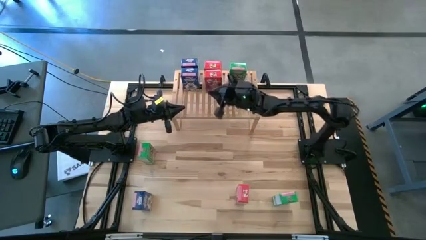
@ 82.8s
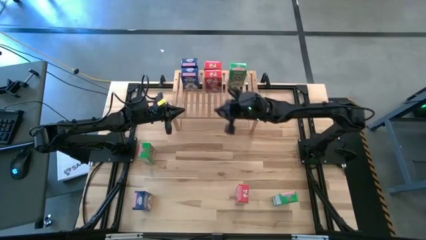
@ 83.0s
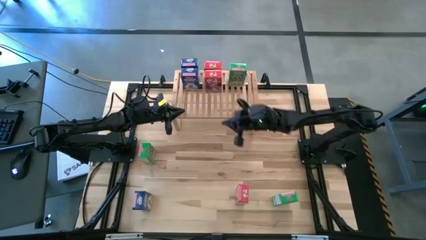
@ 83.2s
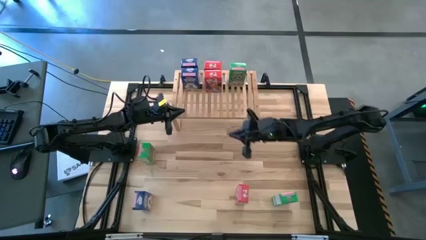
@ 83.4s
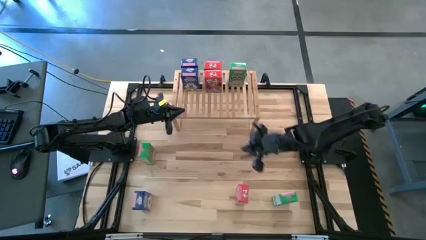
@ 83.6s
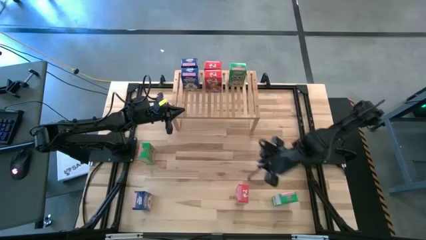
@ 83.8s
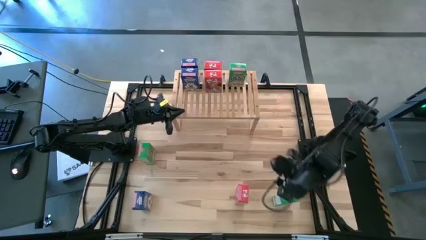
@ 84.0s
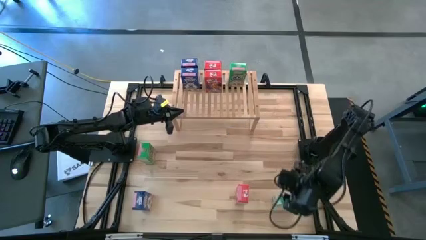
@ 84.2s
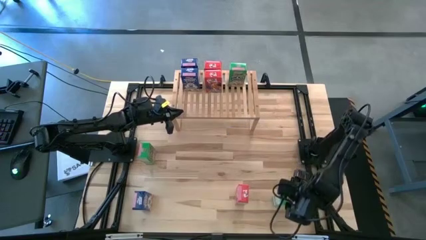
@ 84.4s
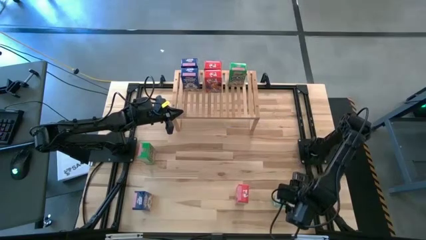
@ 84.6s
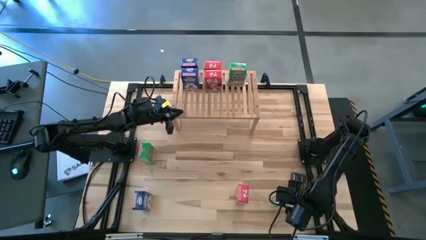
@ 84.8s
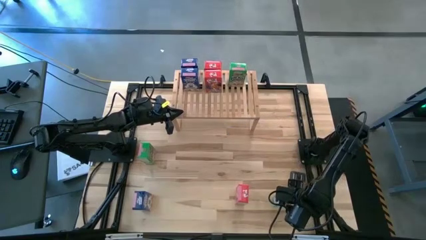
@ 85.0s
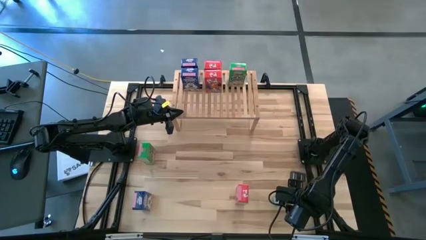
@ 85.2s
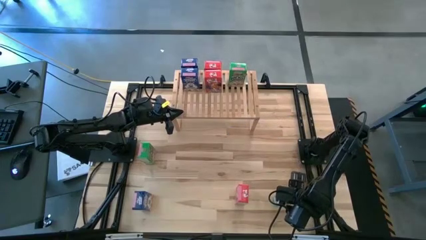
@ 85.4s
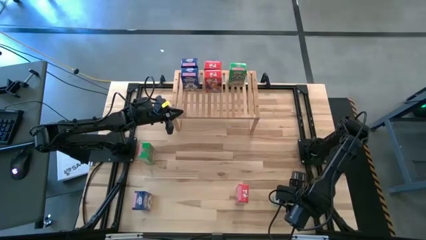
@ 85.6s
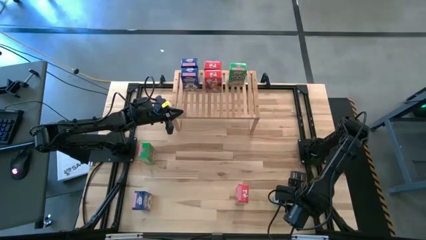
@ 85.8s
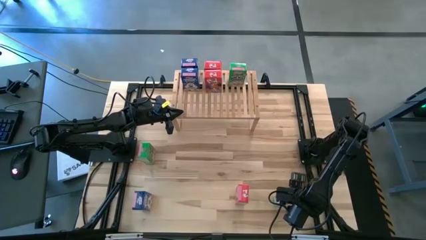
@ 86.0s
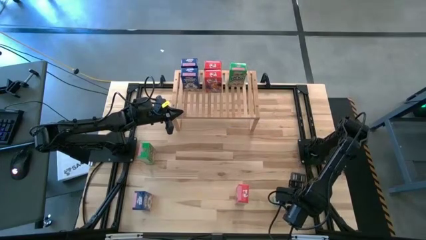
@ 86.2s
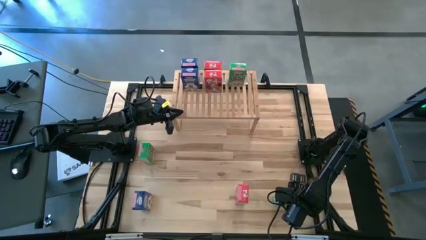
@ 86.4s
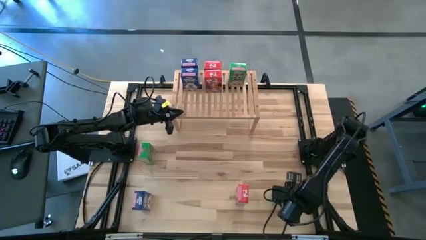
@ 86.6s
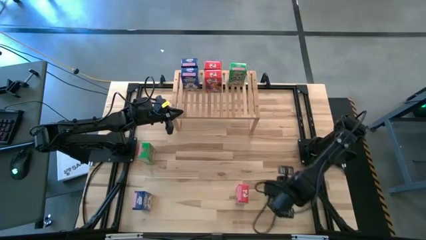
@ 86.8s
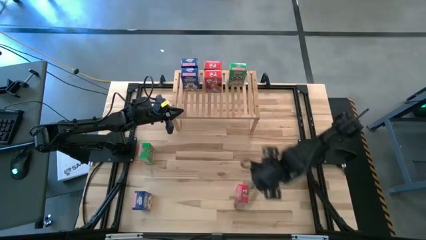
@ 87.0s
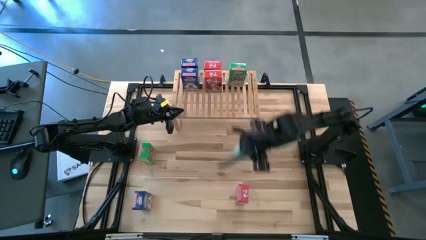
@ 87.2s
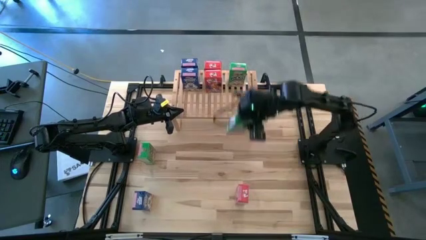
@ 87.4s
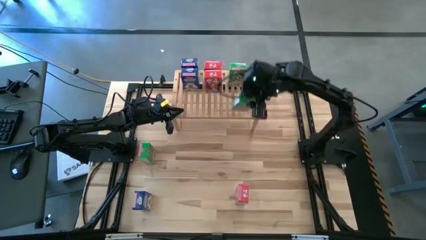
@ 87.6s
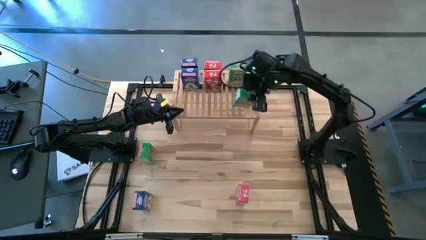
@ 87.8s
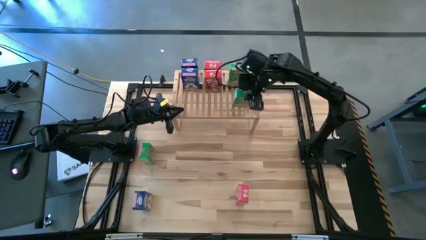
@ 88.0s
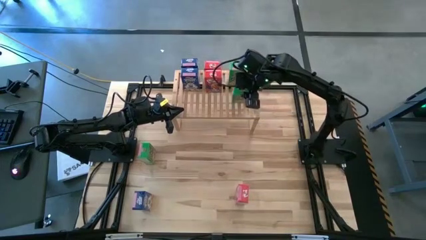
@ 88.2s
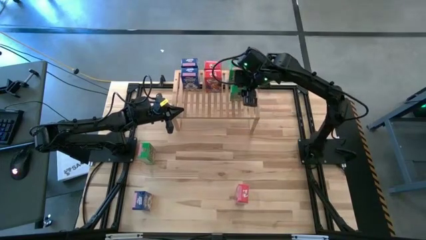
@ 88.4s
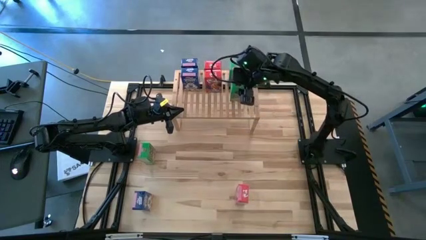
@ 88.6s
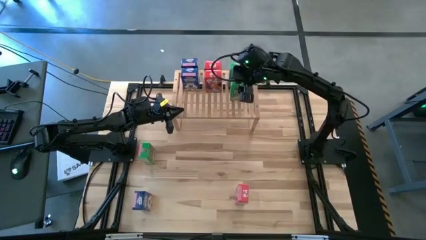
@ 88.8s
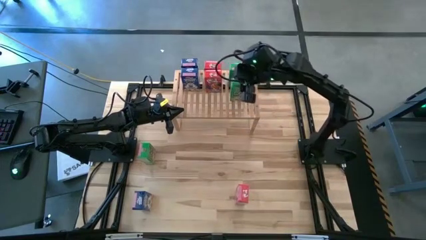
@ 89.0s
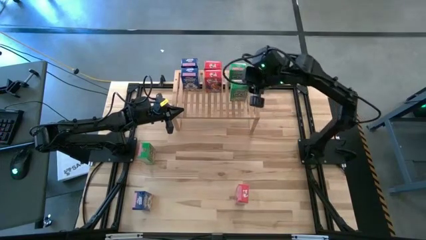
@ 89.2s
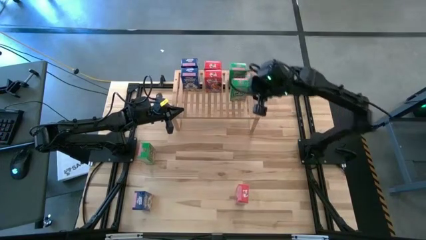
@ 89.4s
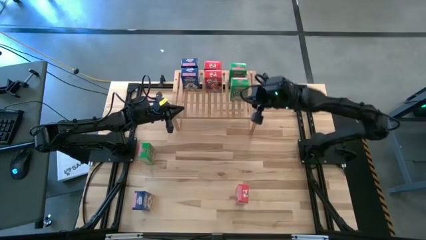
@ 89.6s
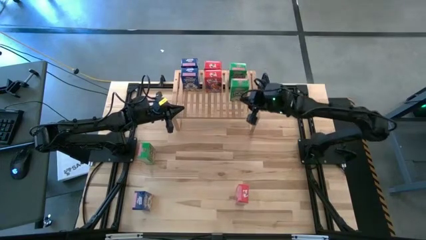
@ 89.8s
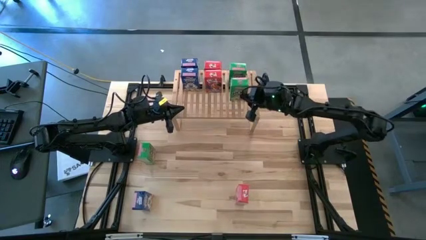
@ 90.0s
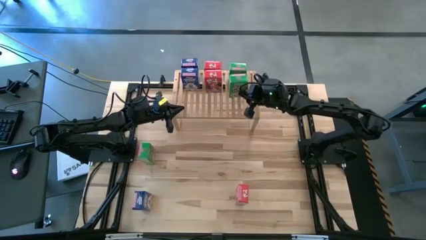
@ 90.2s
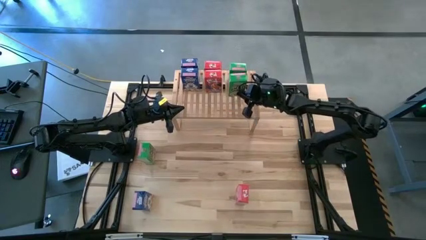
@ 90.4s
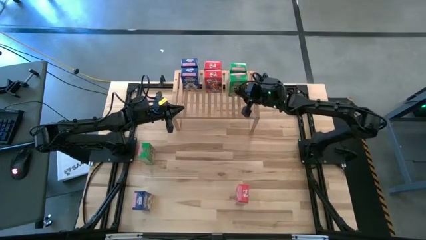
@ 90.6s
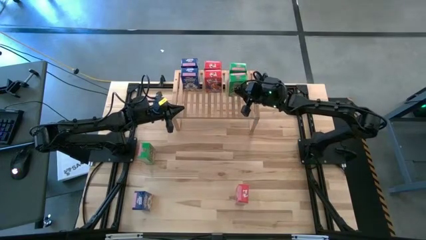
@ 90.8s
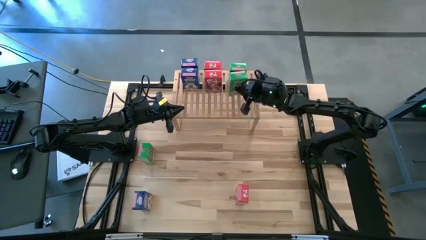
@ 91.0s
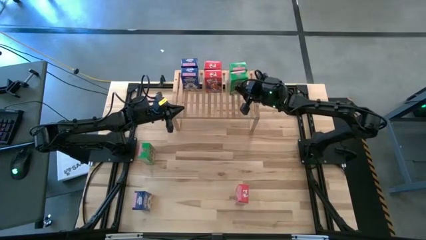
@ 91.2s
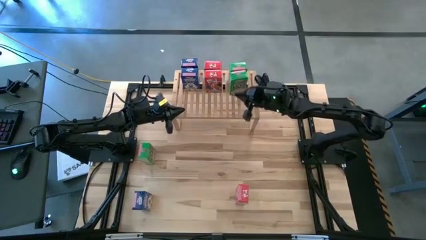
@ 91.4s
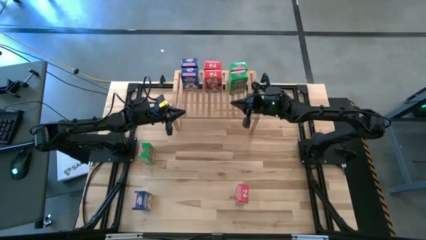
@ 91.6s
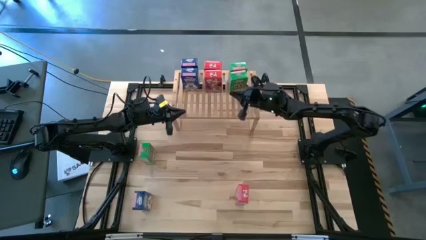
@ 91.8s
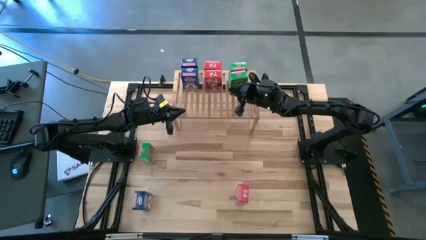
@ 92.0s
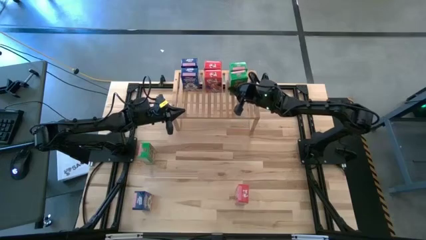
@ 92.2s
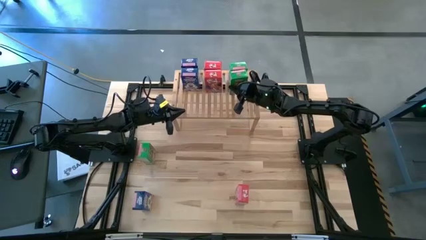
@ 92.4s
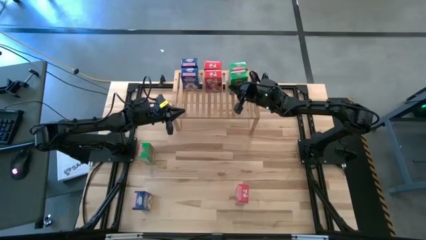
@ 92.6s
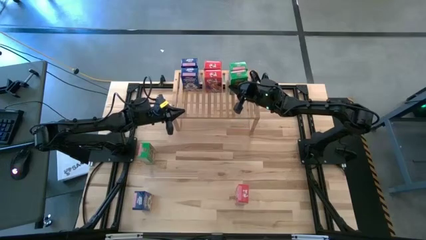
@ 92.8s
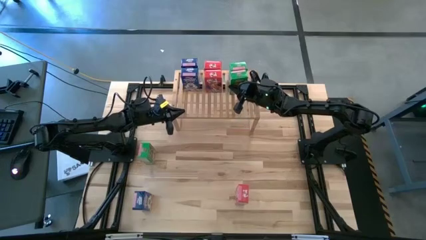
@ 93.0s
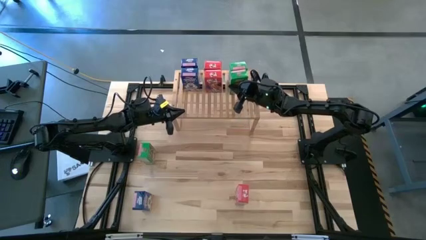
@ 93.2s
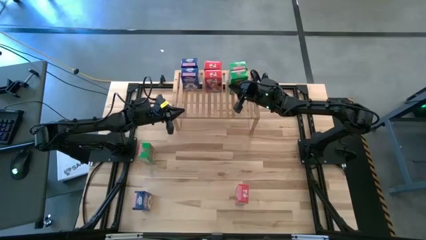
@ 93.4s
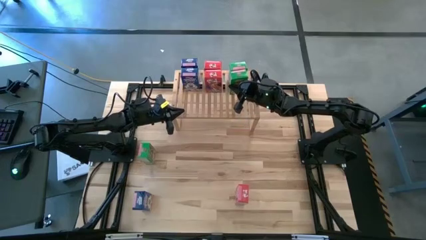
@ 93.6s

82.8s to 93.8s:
Task: Stack cereal on shelf
Put the bottom green cereal box on the shelf aligned with the other green cereal box

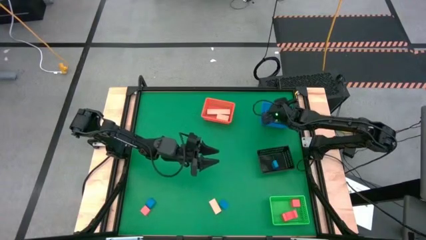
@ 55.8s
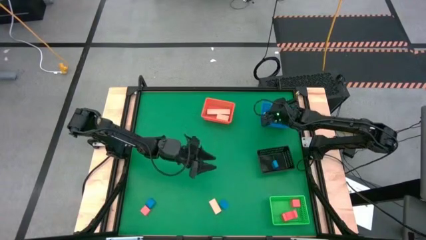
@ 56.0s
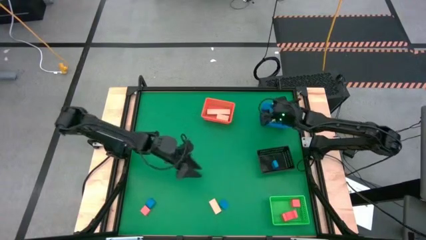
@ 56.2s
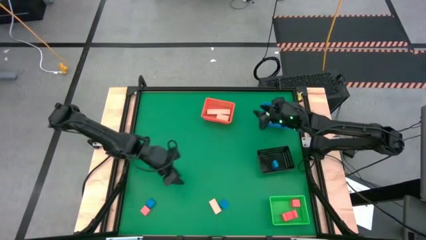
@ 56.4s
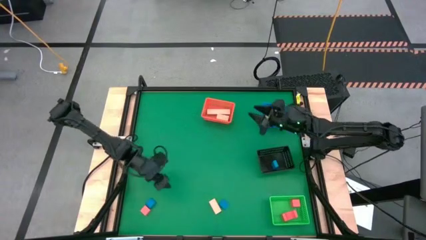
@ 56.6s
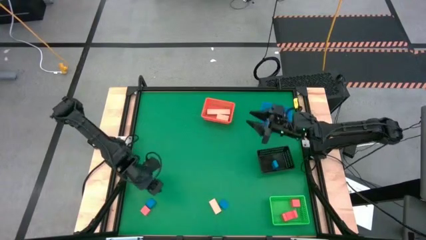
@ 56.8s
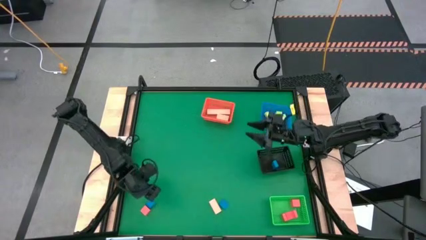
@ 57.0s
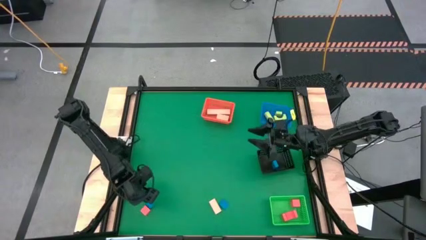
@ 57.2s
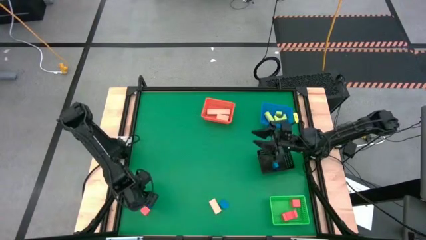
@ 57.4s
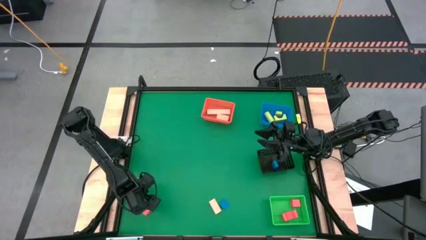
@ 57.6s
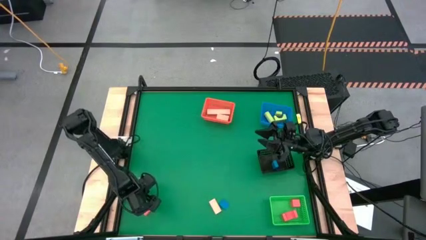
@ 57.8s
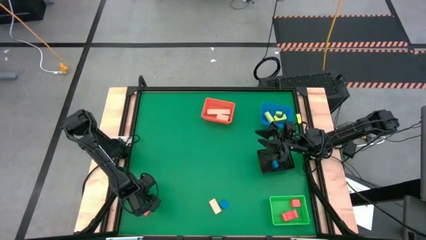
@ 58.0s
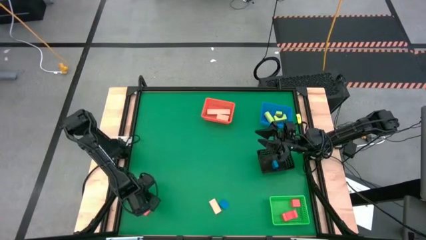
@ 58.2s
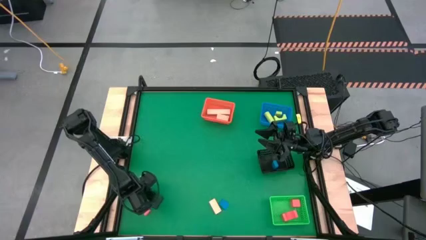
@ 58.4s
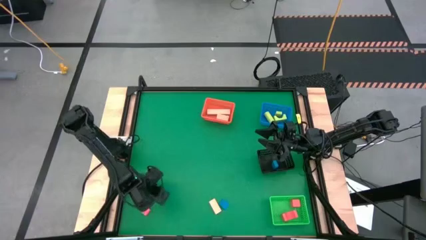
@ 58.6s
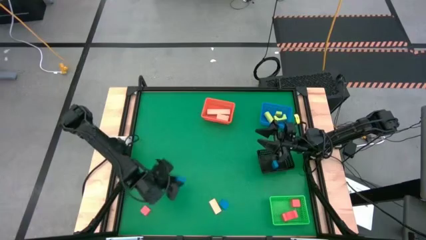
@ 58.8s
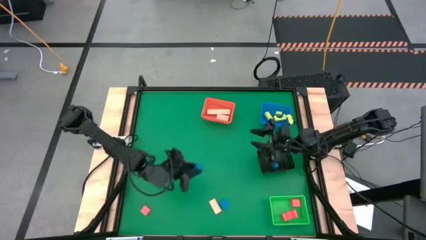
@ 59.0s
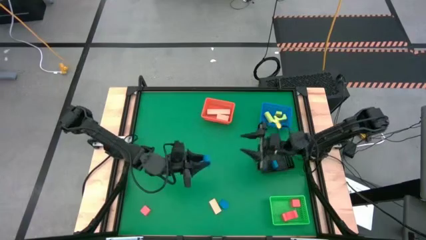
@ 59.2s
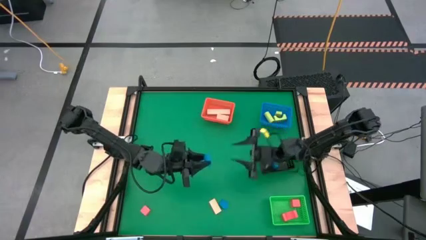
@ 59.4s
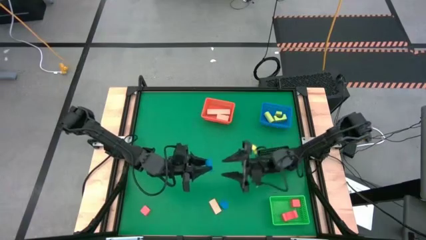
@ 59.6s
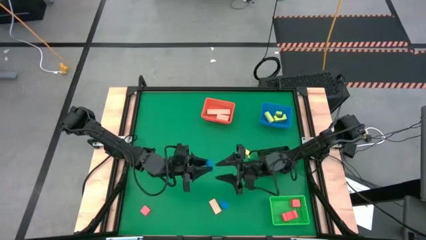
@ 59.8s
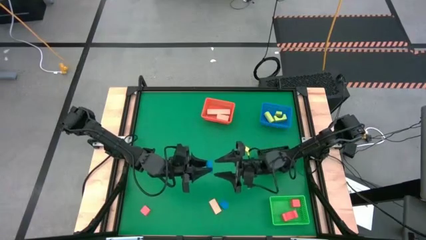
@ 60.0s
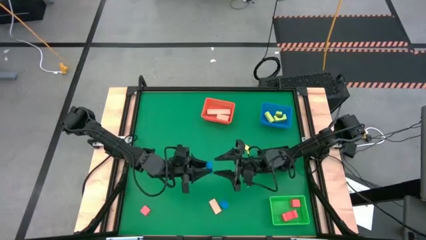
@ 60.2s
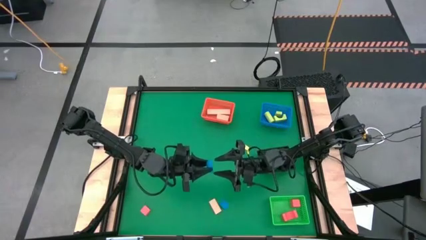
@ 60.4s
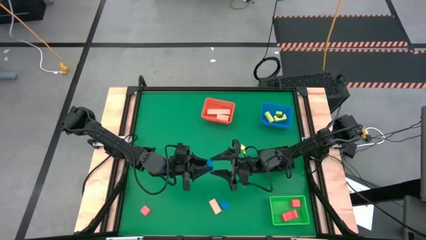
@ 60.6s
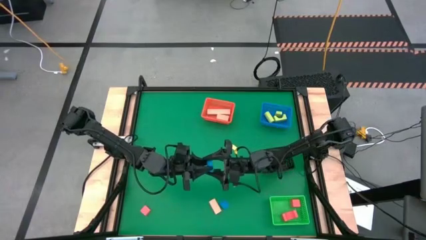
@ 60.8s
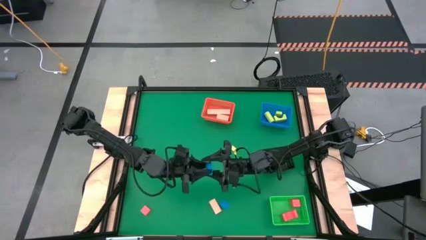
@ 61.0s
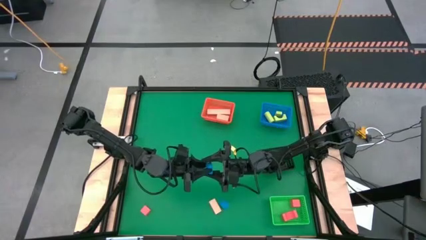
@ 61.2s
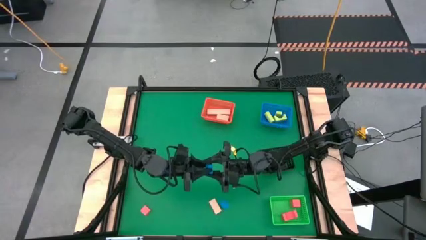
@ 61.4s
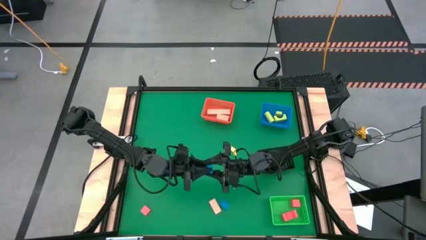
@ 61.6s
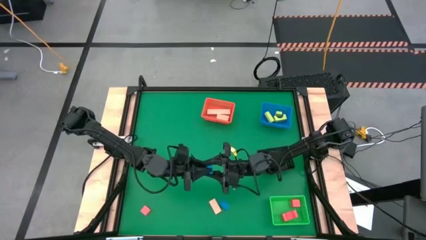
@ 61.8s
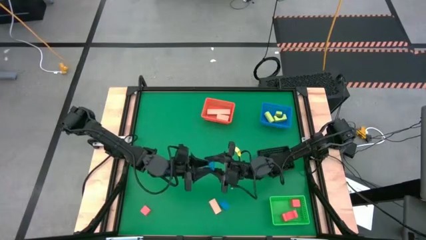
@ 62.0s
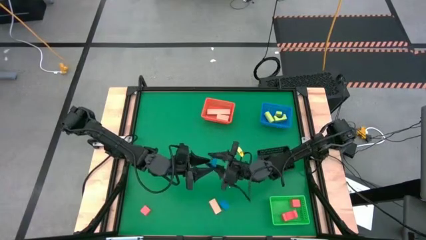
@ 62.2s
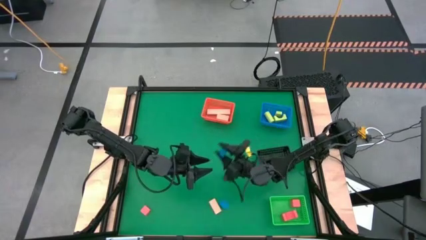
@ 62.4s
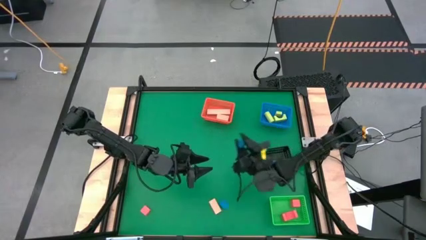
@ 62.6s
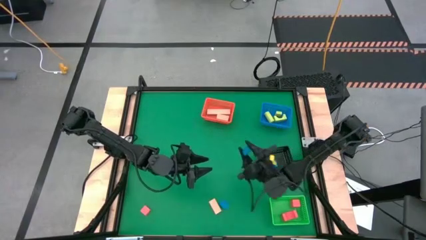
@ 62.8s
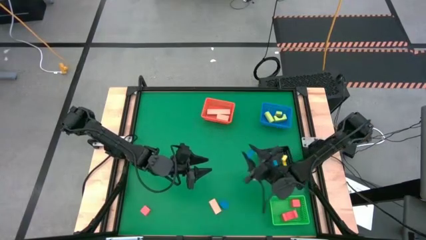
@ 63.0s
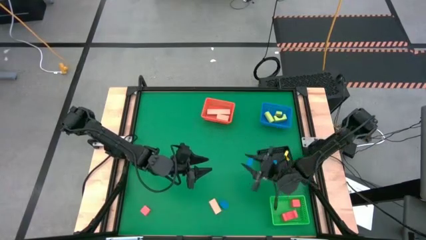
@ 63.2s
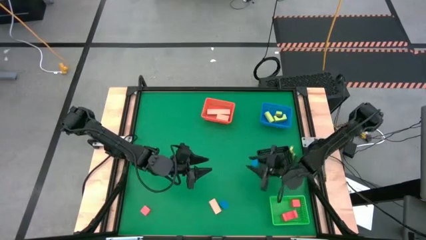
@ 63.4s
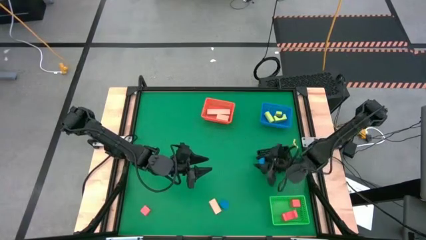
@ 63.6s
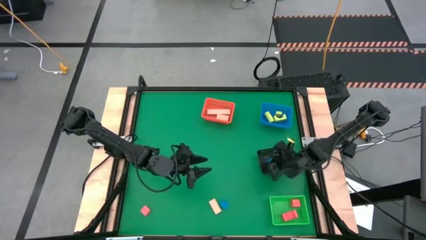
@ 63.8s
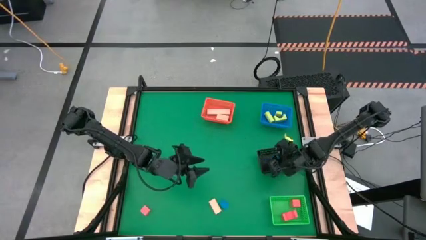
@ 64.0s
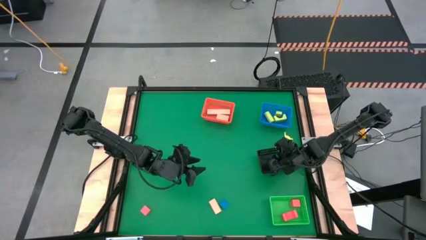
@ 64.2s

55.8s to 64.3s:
Task: Sort & place blocks by color
Put the left blue block into the black bin
